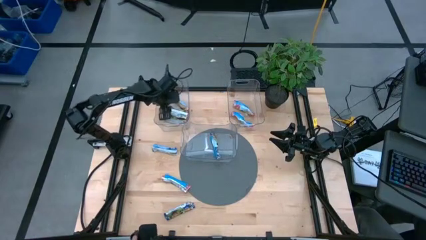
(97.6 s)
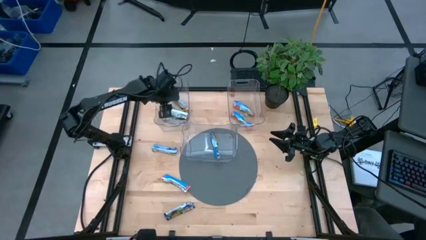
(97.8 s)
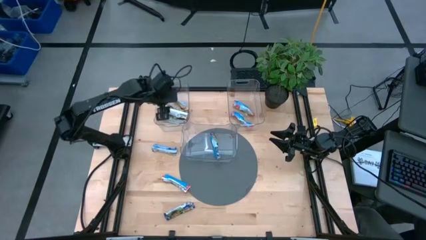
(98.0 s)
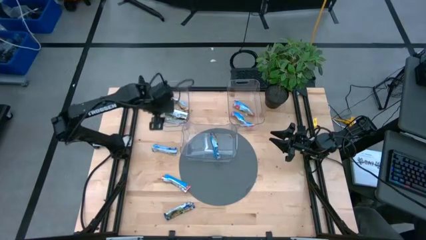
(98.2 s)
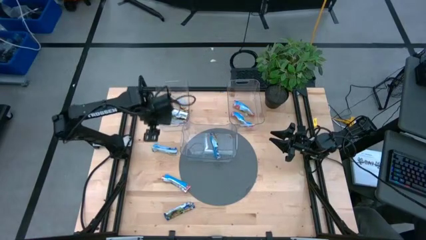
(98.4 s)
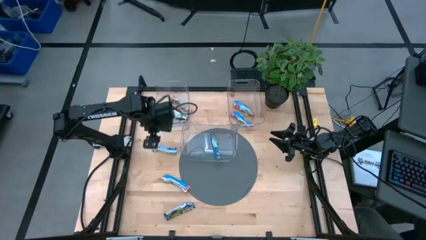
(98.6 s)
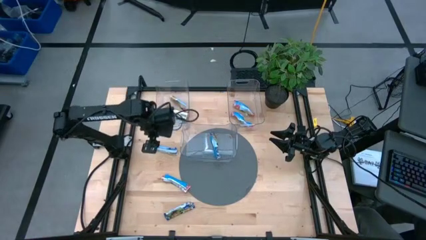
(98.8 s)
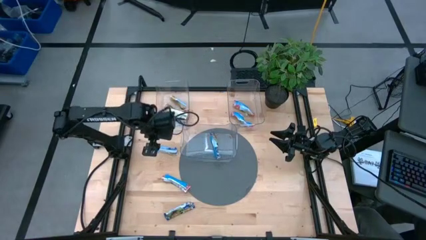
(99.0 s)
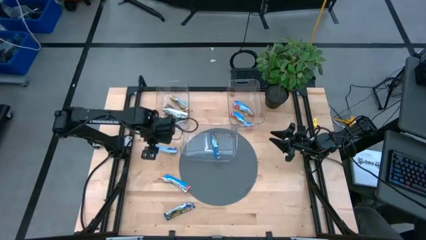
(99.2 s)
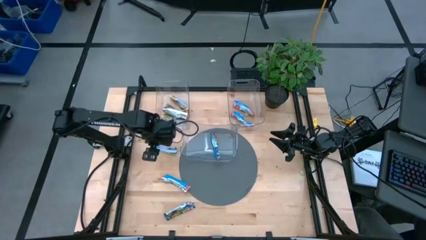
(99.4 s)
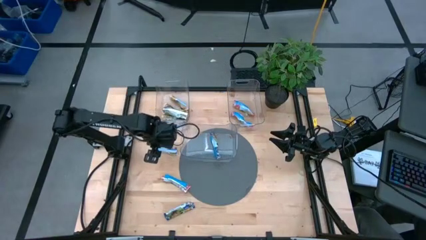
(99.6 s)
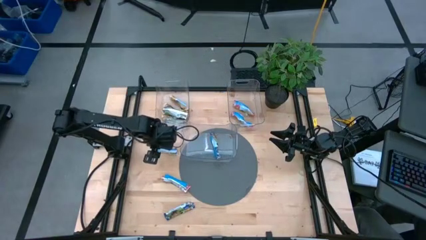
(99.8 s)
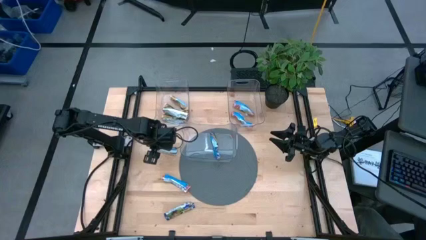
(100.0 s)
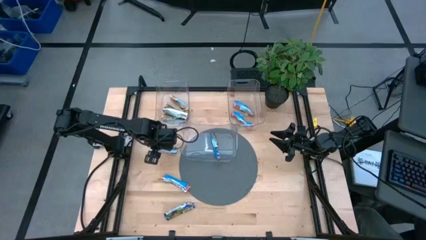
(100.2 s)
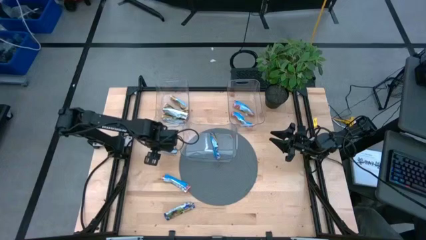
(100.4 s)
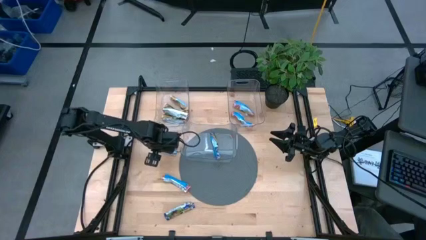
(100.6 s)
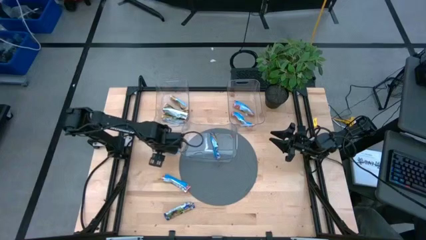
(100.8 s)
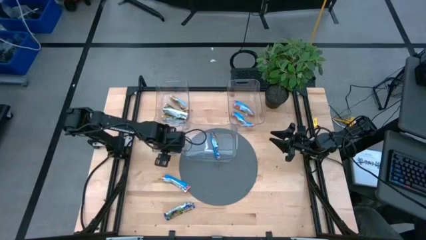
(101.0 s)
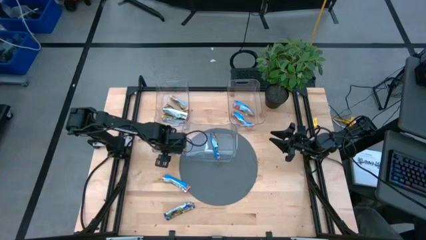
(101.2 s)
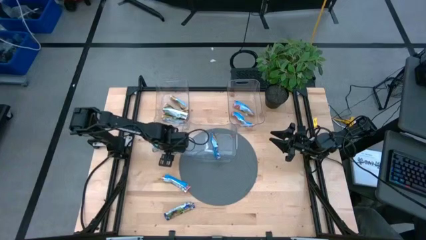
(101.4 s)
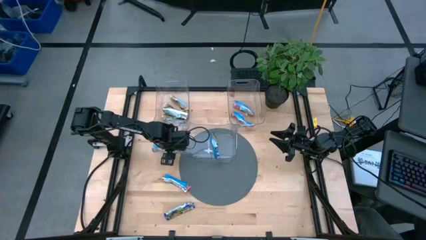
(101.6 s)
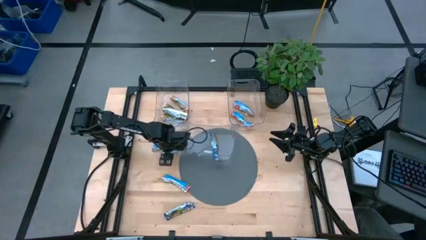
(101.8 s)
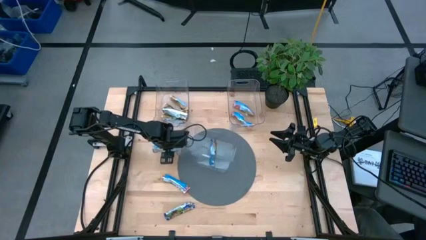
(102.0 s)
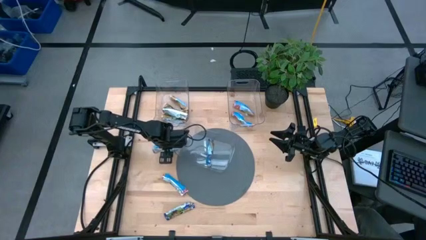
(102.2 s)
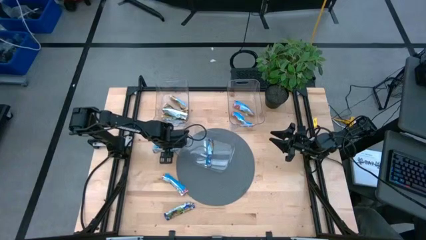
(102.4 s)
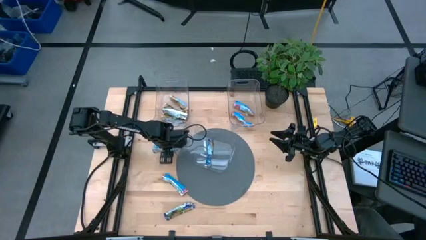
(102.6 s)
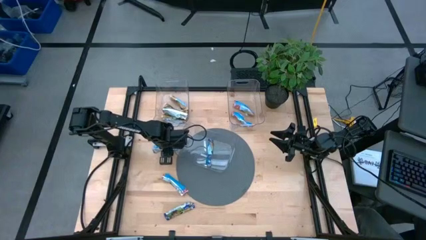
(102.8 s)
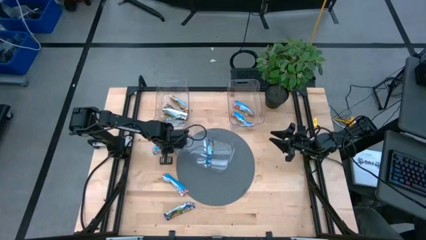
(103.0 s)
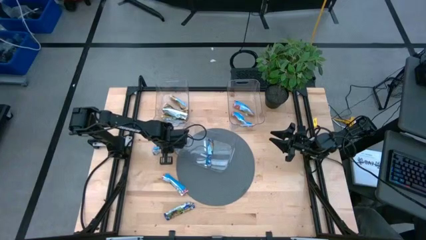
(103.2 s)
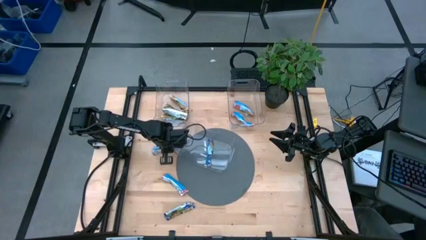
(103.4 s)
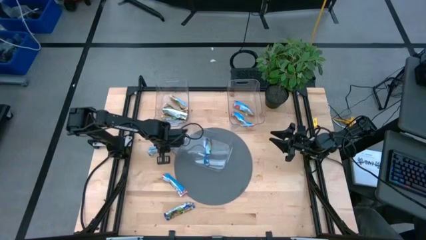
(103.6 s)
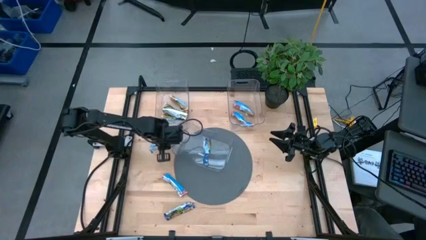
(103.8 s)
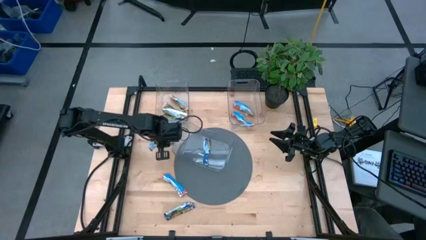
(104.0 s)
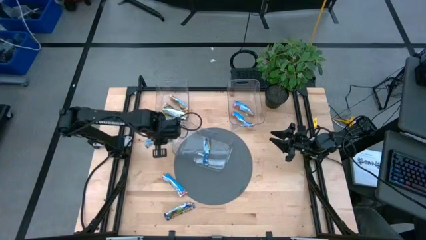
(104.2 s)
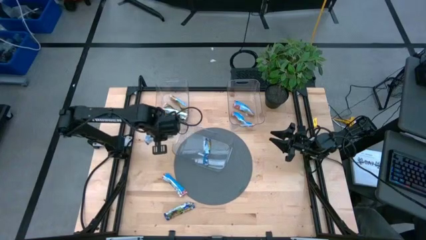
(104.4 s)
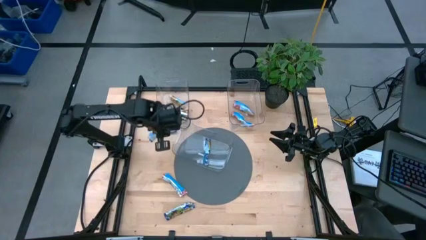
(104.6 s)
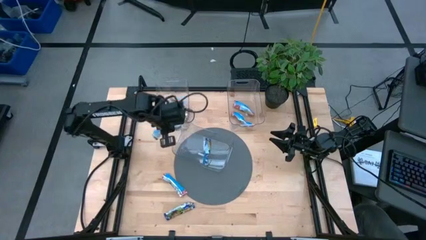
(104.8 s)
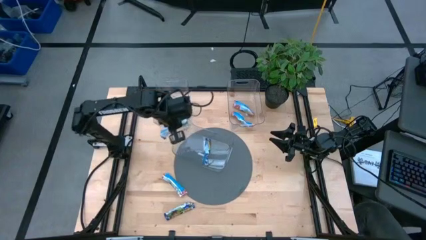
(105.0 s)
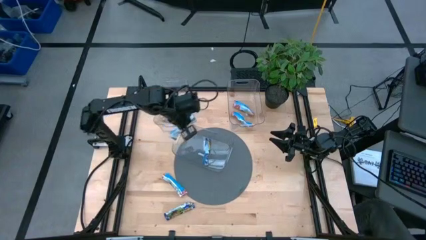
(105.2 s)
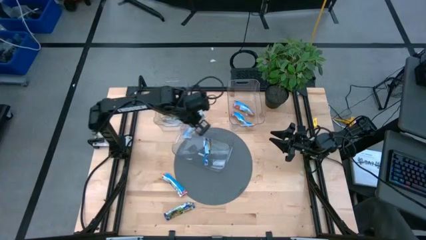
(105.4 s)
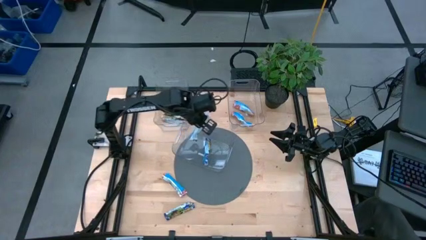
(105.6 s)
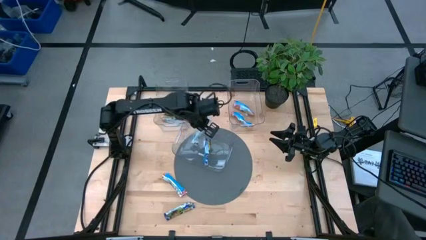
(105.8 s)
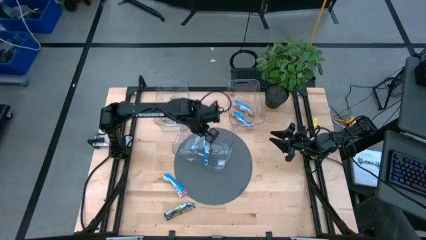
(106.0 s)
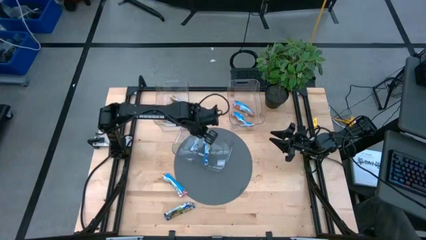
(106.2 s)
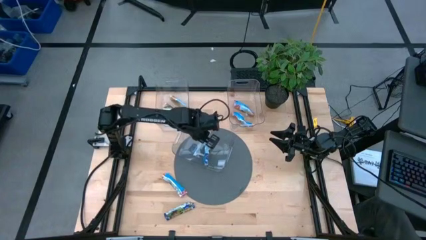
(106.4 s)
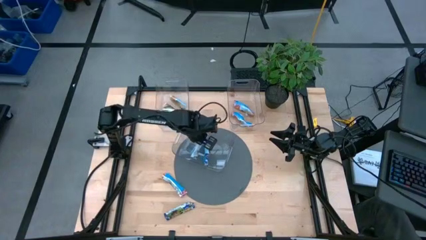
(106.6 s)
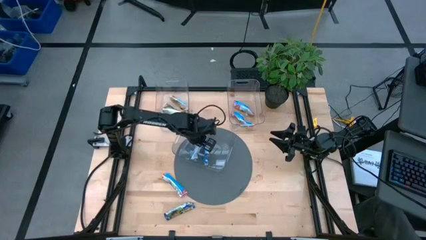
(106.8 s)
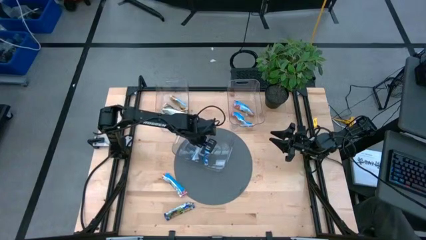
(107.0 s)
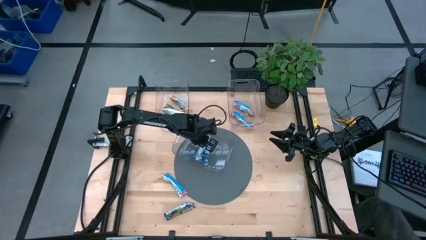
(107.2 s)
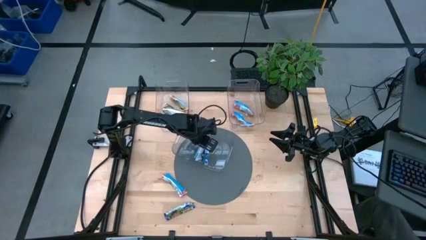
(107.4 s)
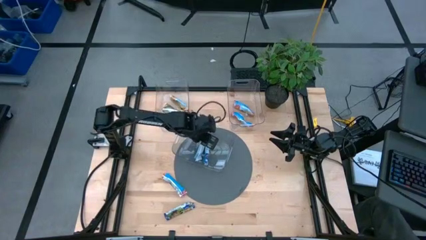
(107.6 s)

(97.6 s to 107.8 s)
Task: Pick and place Granola Bars by type
Put the blue granola bar into the bottom transparent bin

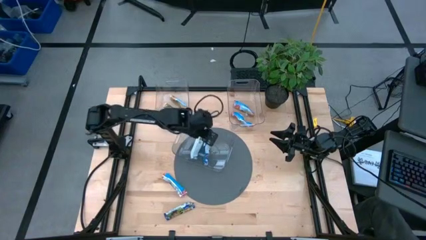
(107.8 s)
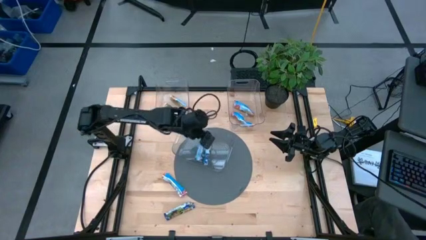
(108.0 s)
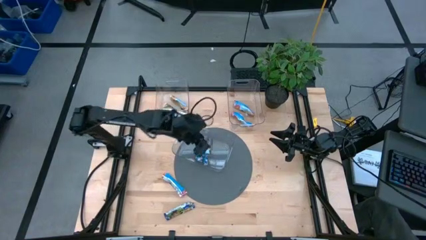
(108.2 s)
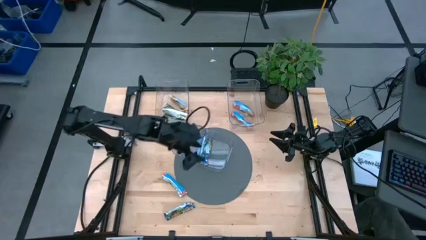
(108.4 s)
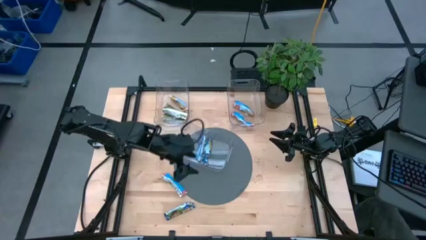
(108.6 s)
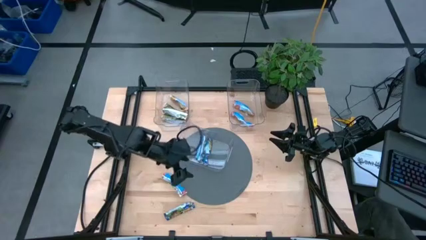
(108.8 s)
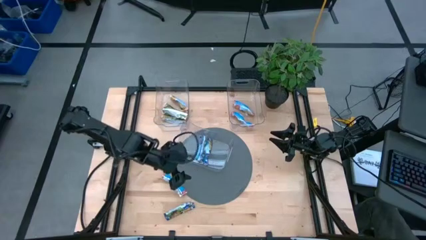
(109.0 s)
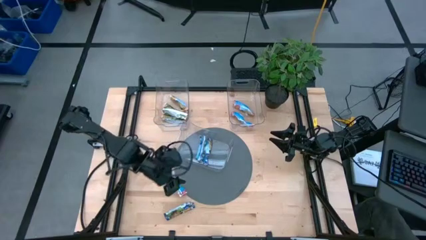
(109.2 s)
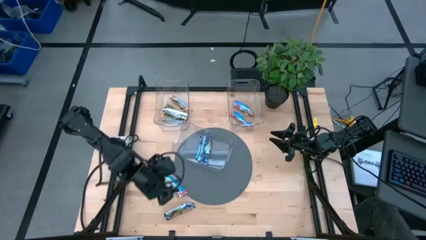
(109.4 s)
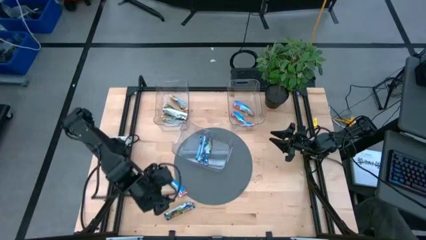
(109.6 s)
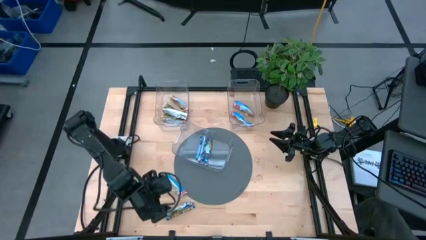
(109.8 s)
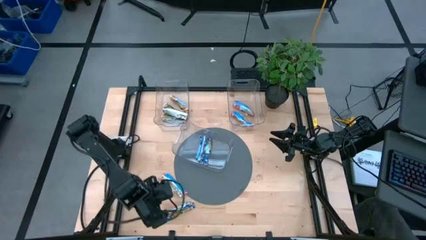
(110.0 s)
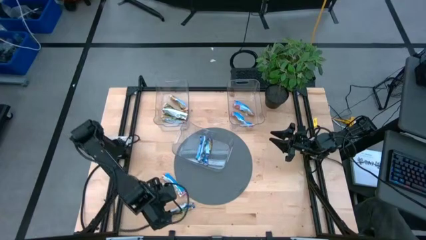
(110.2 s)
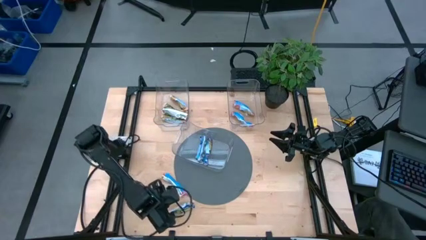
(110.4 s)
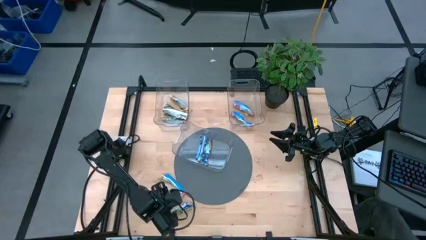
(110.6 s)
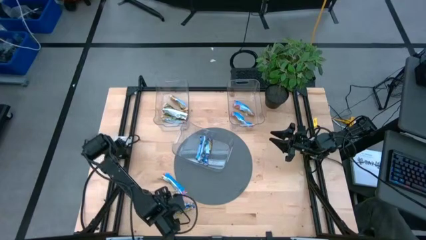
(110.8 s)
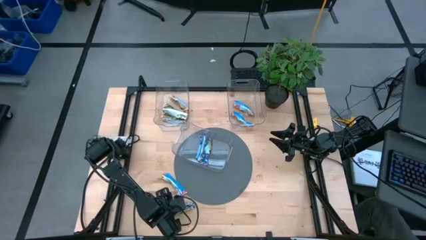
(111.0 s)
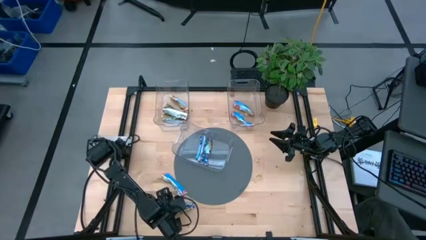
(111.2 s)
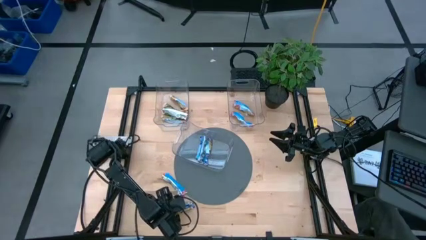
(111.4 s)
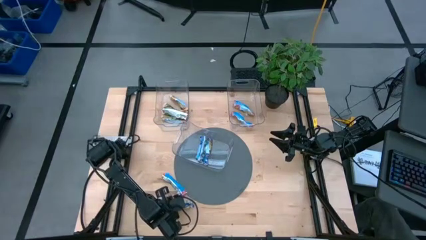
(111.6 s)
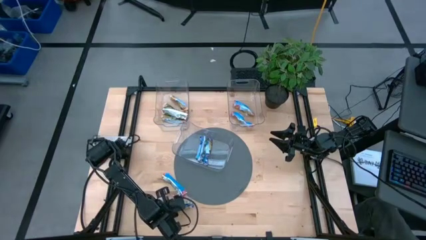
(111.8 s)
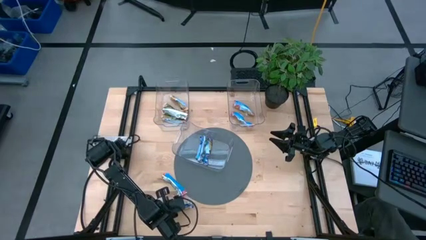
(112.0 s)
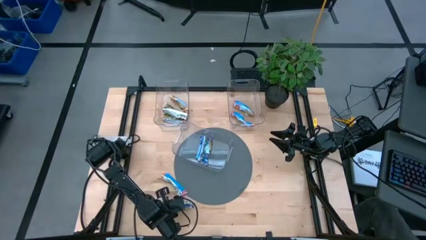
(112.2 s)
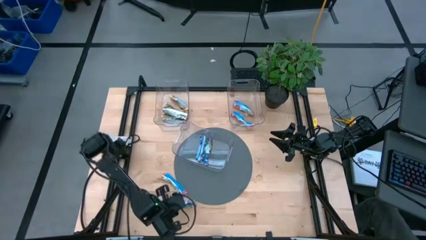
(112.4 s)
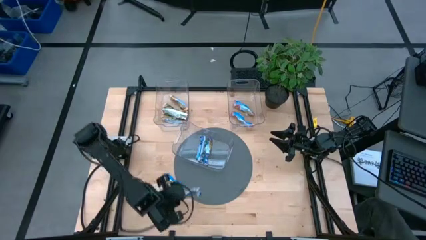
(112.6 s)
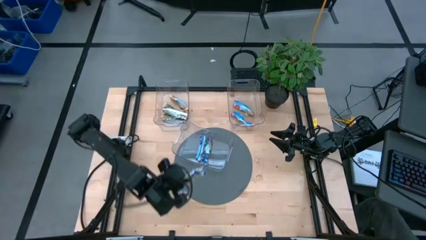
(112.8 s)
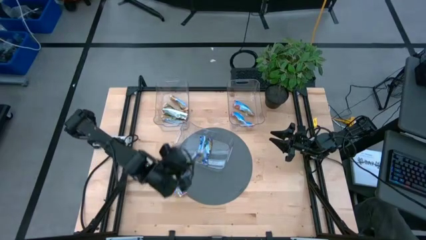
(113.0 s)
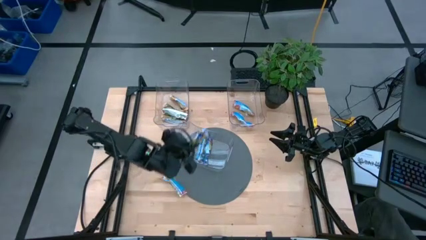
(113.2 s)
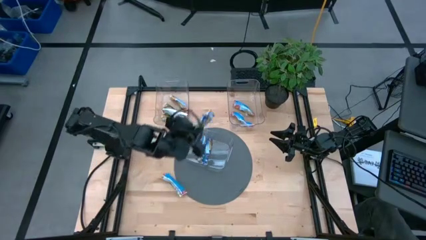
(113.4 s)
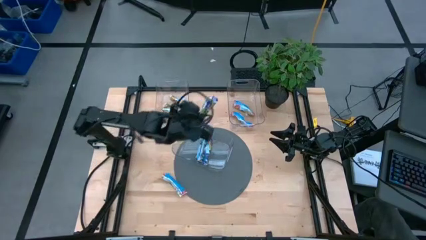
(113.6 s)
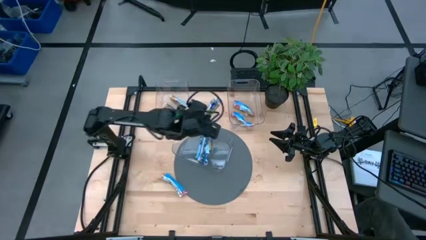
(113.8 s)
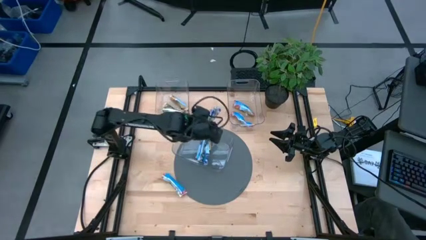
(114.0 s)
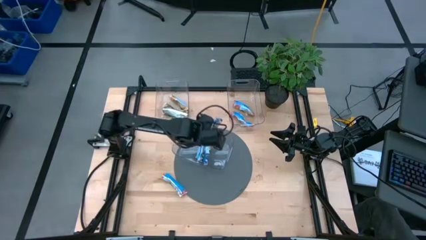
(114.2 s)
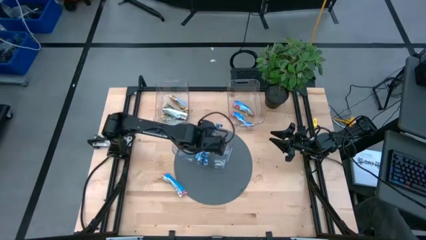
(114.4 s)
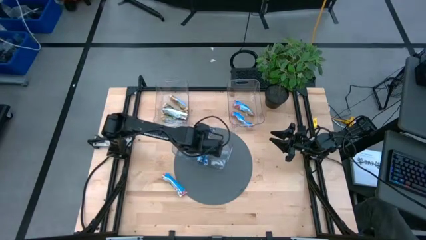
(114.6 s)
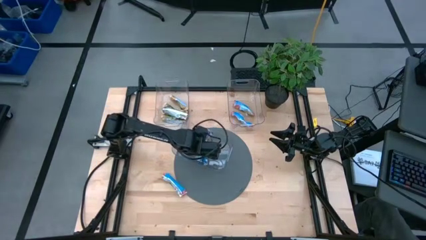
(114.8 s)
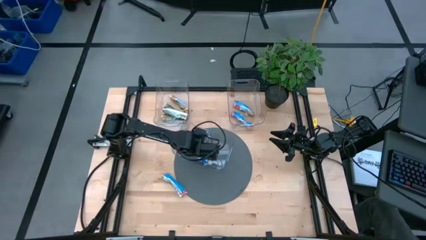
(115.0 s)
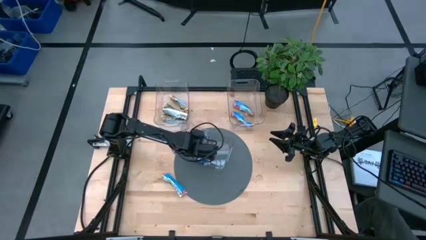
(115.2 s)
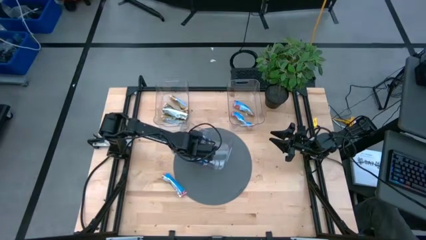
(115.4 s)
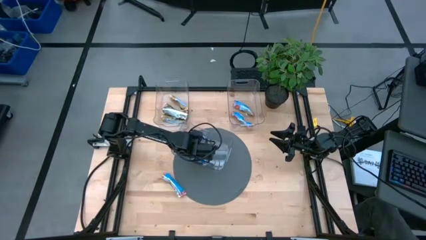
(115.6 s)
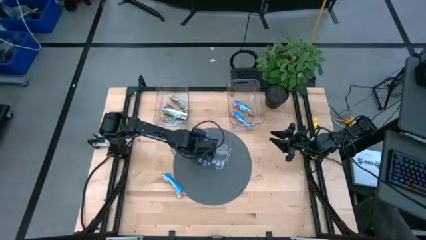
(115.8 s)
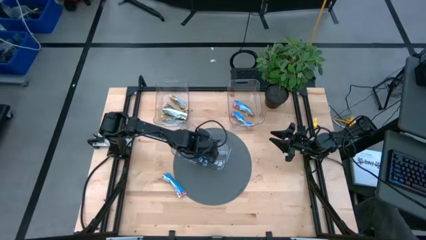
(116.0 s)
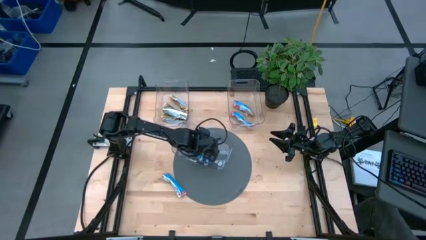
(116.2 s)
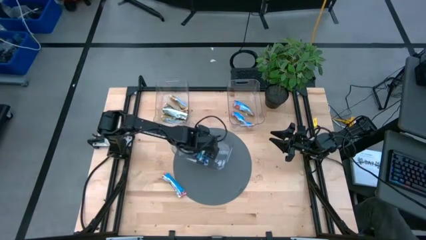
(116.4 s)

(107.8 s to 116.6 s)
Put the blue granola bar into the bottom transparent bin
